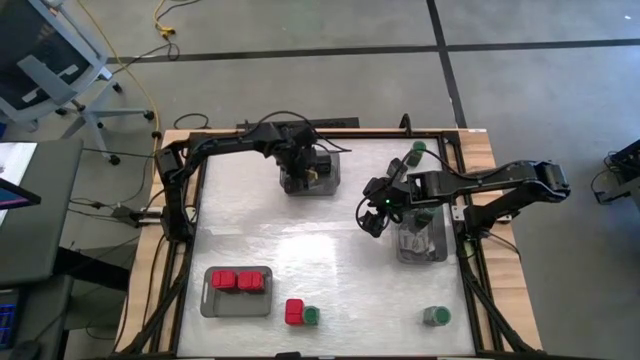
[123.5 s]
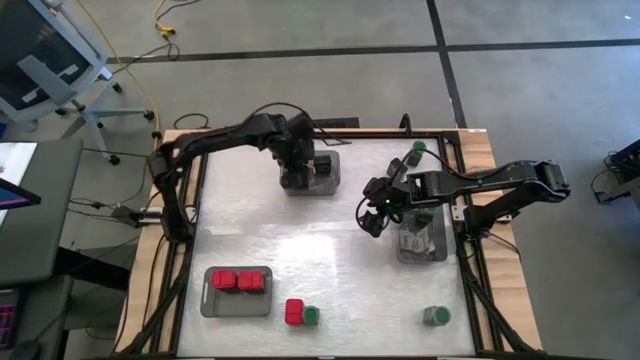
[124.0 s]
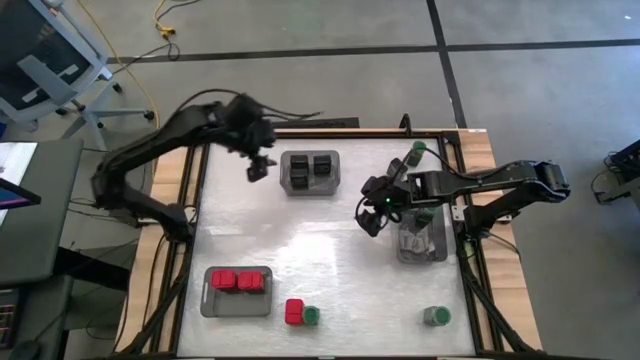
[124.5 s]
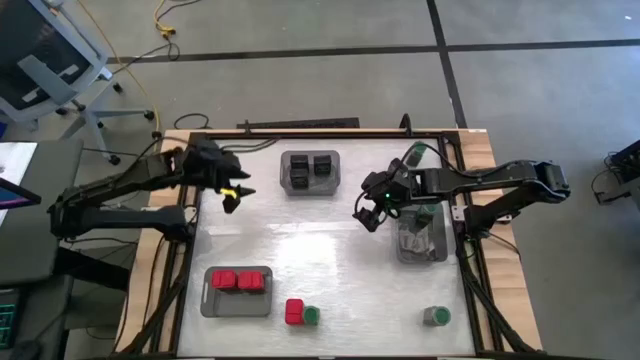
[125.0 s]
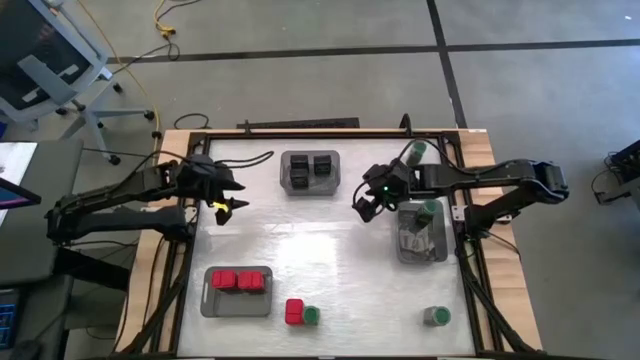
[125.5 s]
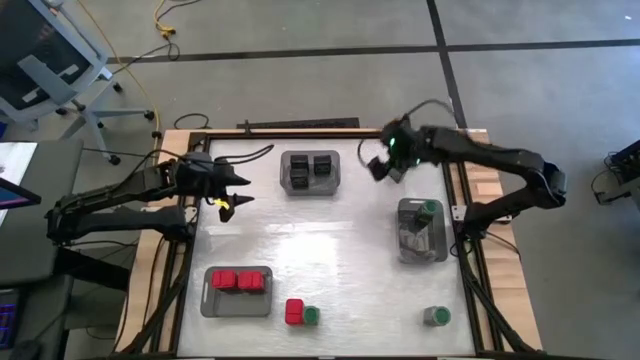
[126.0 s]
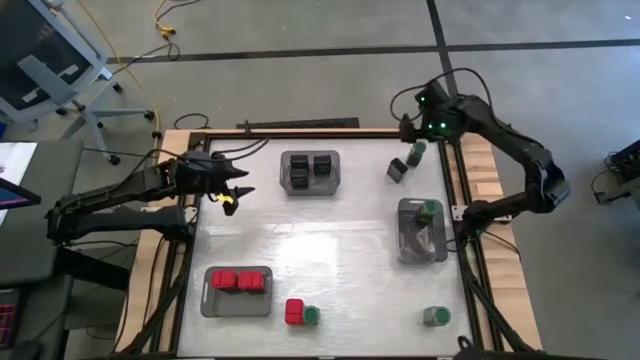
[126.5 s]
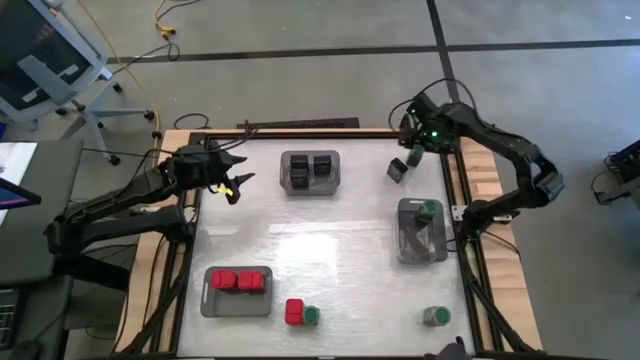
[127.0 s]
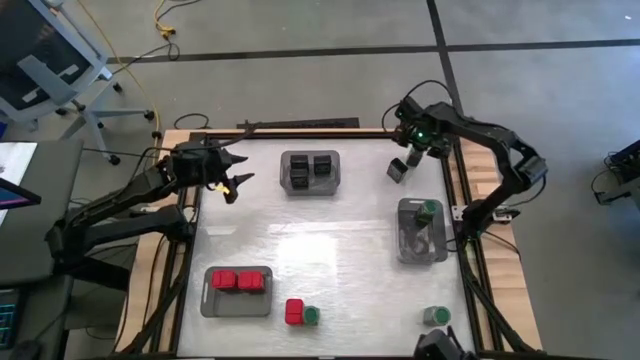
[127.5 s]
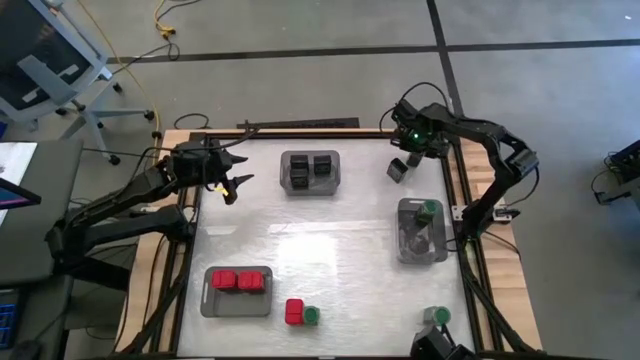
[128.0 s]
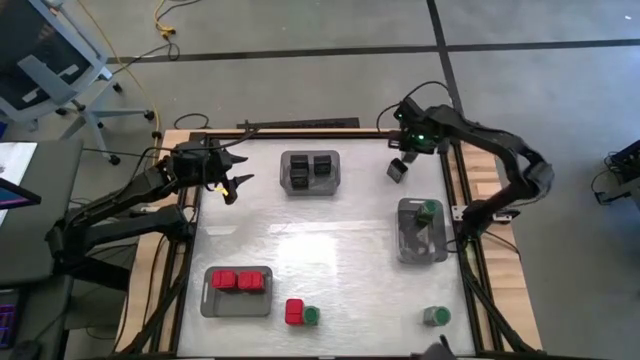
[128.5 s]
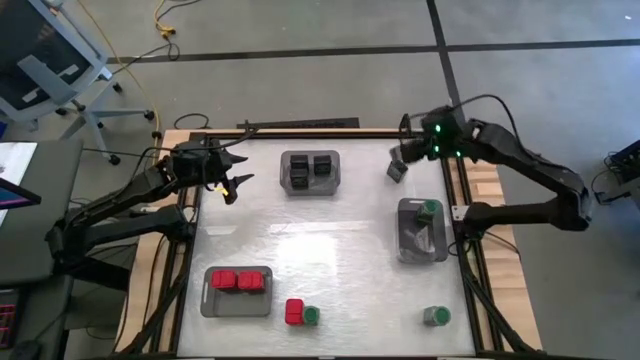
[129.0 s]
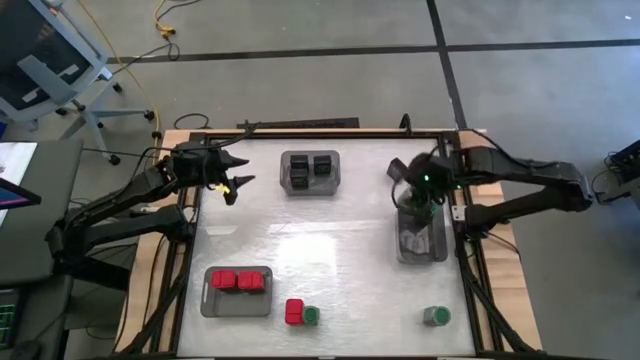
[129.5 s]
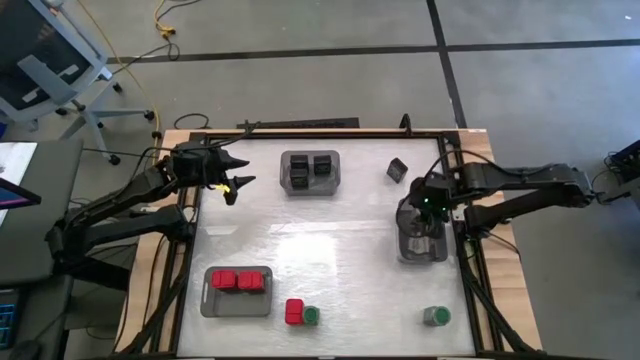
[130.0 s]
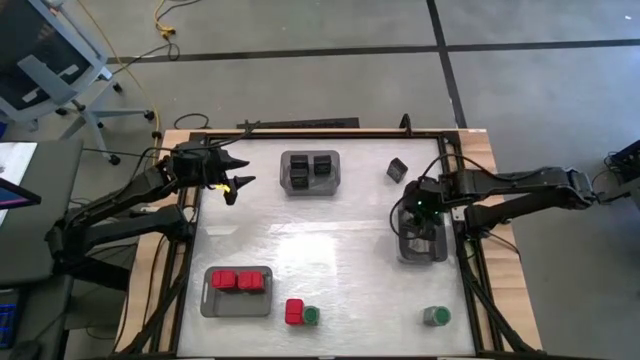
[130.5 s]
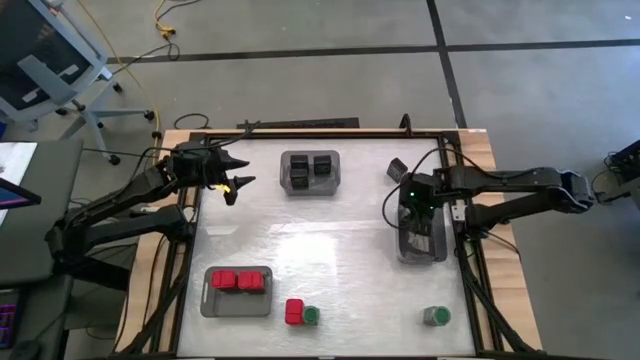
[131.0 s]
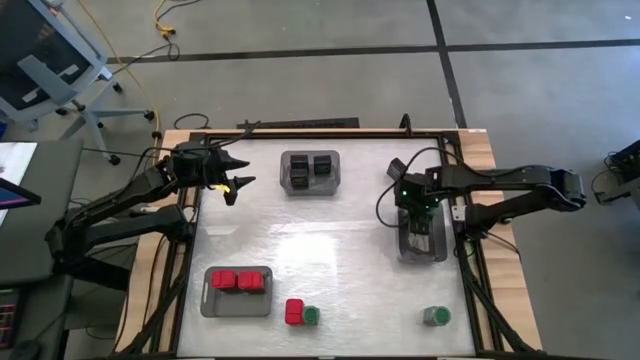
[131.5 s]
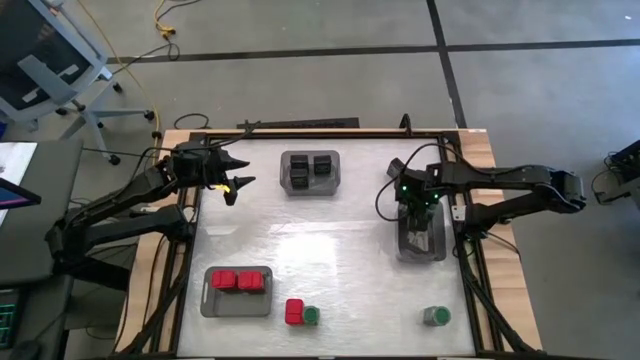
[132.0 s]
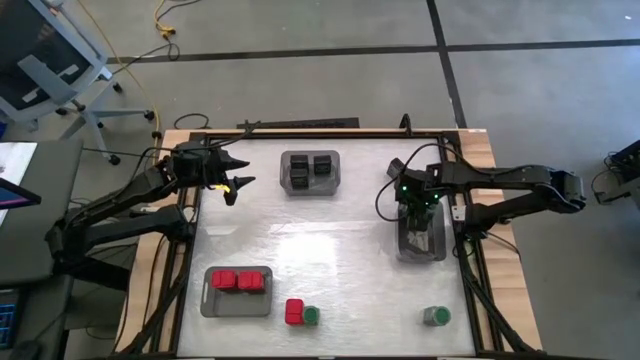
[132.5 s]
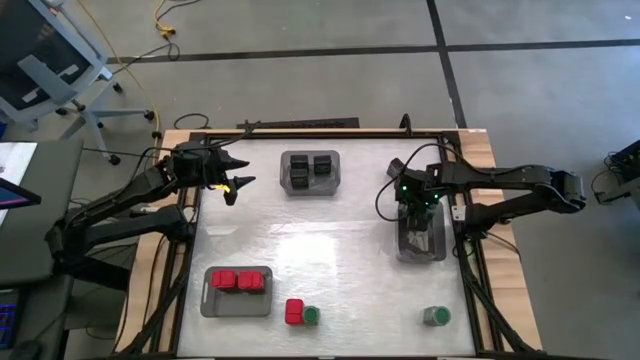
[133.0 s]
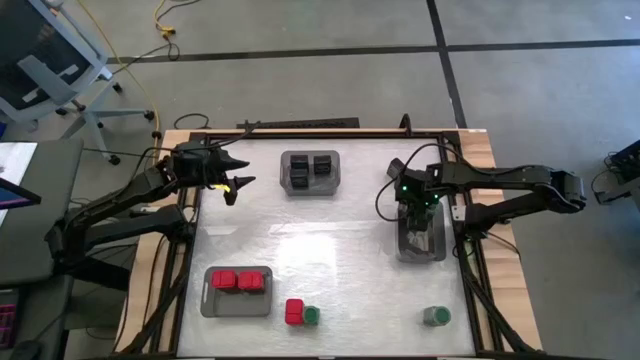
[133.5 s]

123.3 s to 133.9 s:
Task: Sort spices by type
Put the top right green seasoning bottle into the middle right black transparent bin

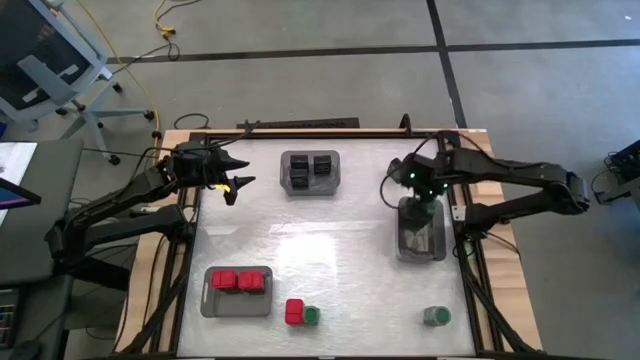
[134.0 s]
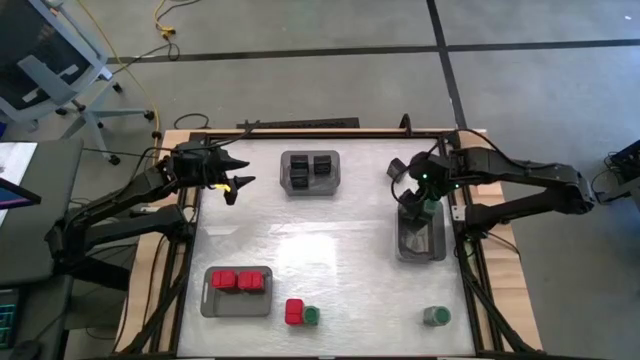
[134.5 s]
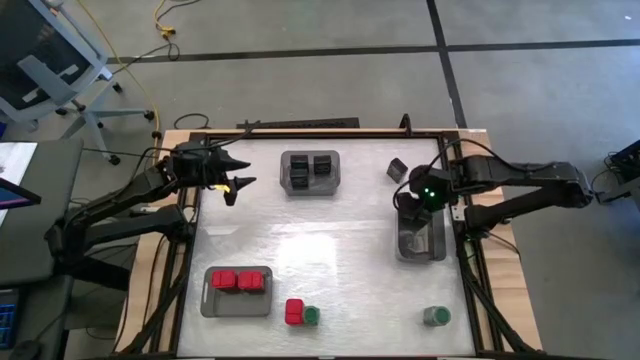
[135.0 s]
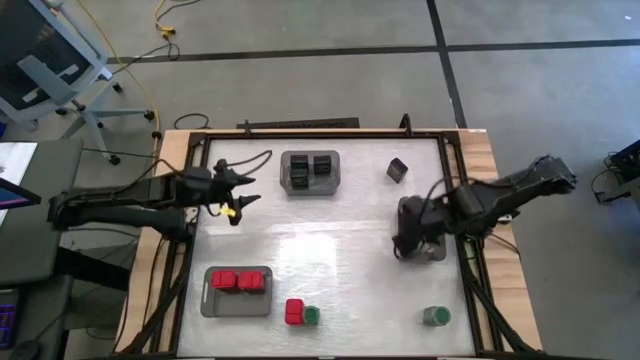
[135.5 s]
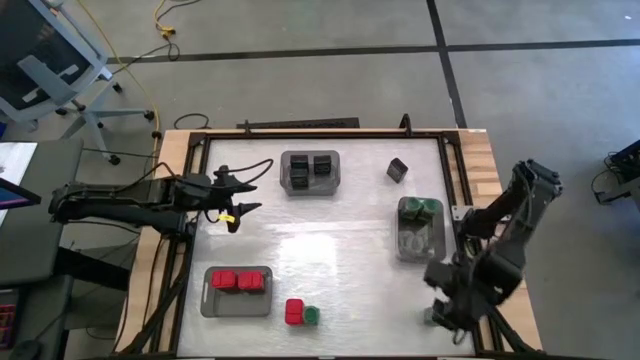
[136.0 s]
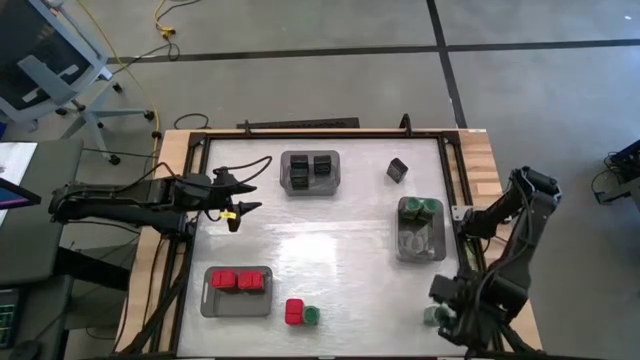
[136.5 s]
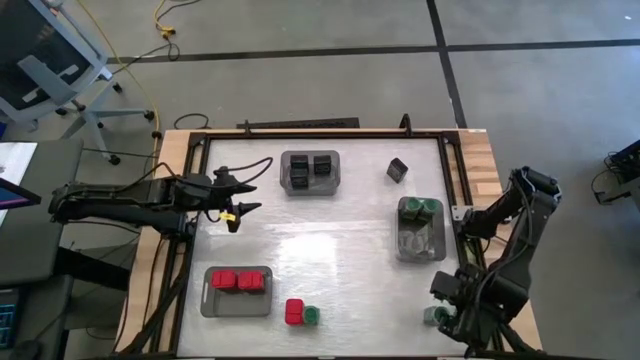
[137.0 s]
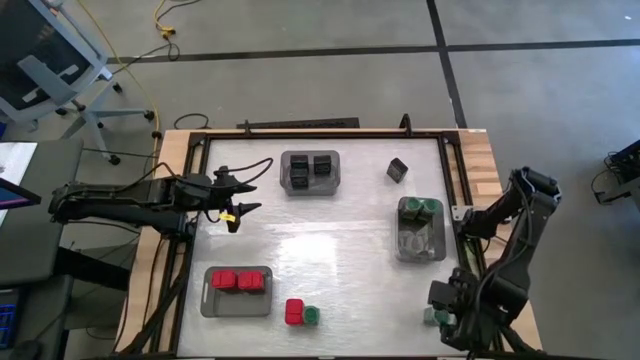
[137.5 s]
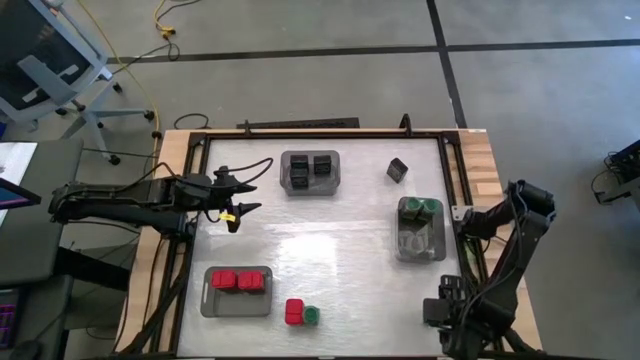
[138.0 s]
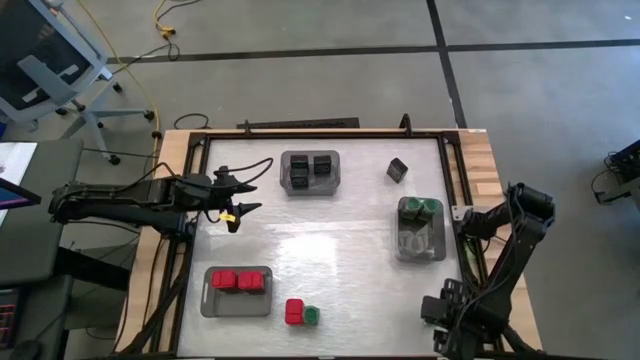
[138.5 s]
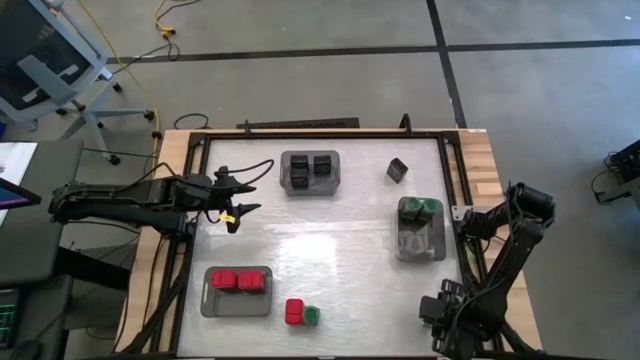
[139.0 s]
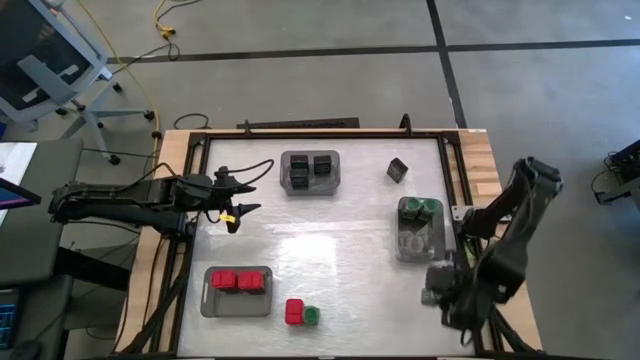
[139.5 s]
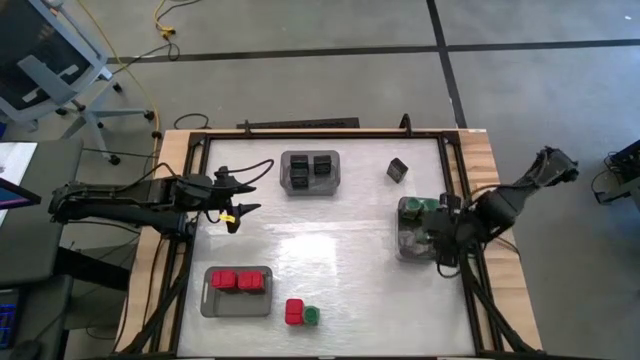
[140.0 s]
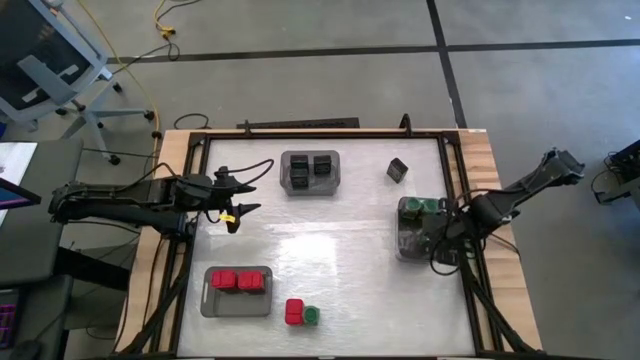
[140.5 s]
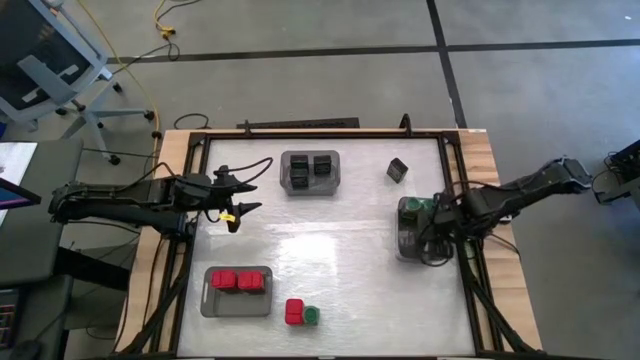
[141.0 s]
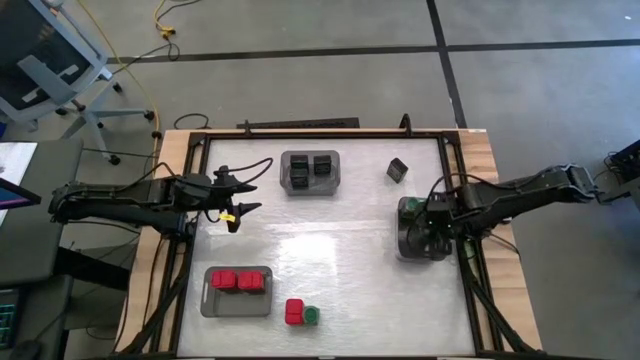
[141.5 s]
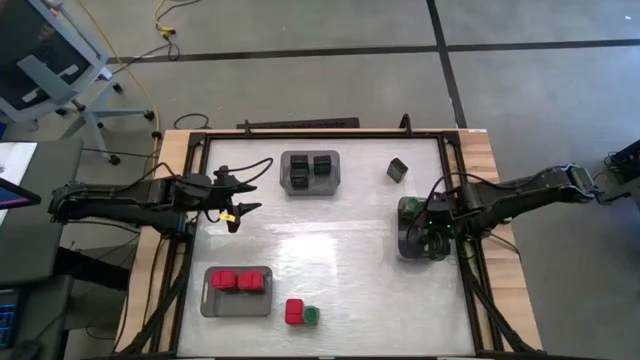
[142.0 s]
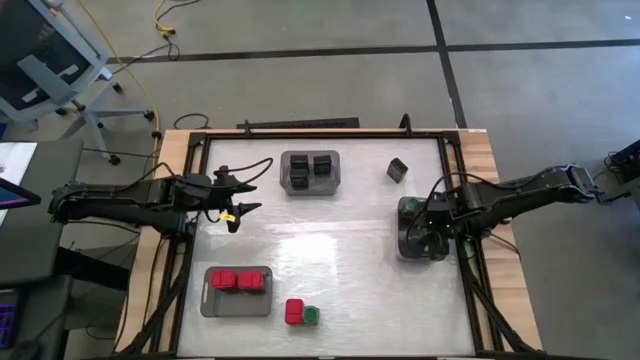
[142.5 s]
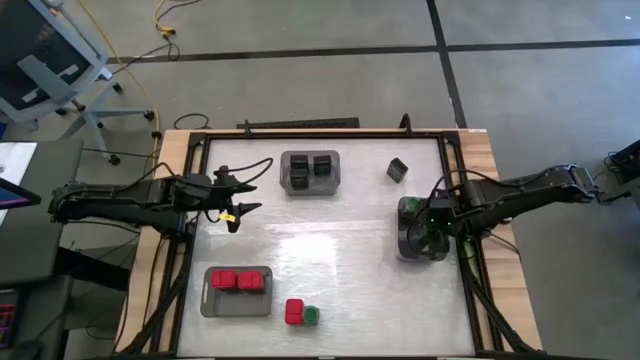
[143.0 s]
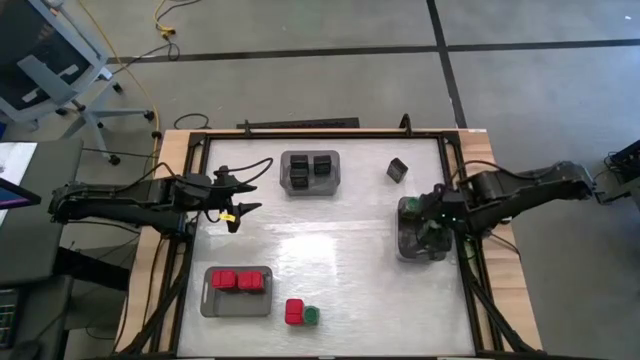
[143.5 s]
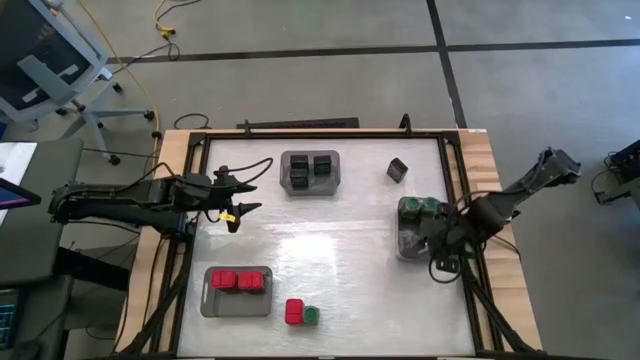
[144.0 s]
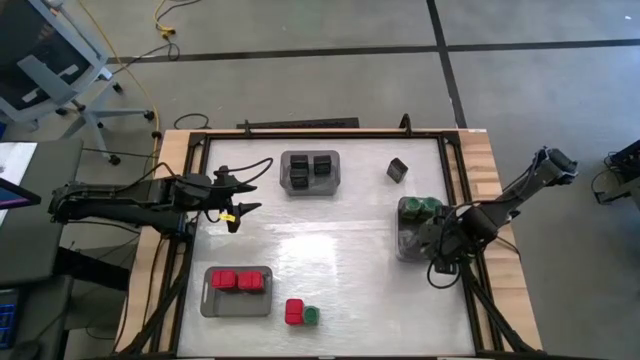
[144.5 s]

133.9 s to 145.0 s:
Put the right green seasoning bottle into the middle right black transparent bin
